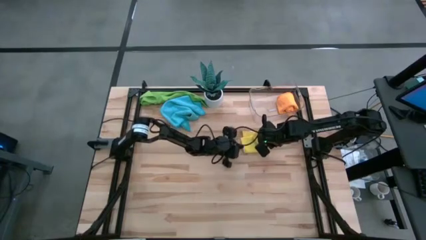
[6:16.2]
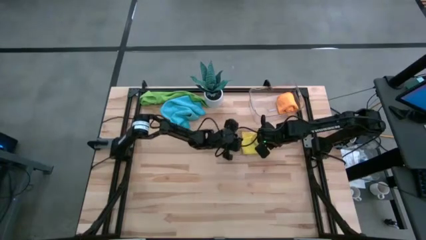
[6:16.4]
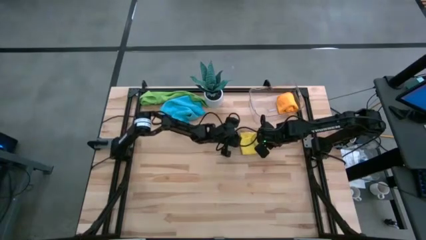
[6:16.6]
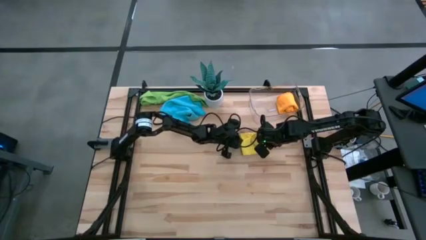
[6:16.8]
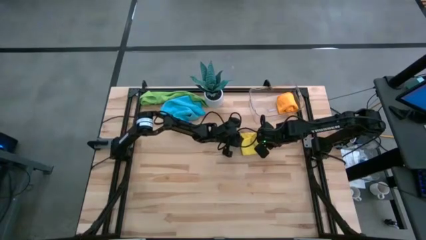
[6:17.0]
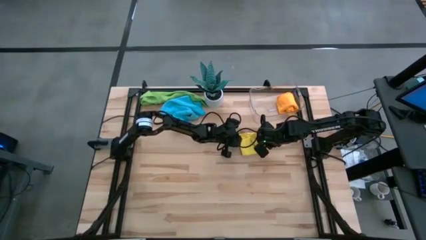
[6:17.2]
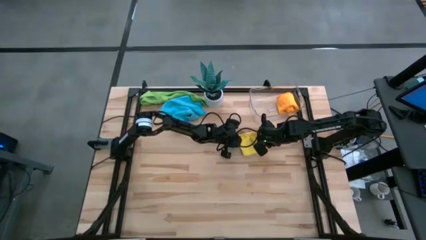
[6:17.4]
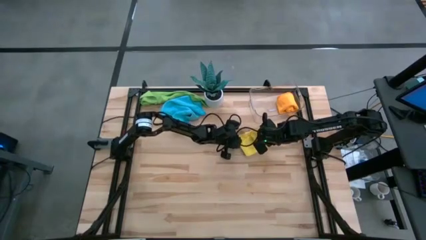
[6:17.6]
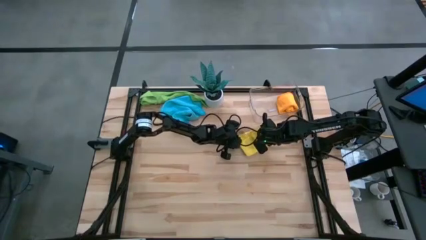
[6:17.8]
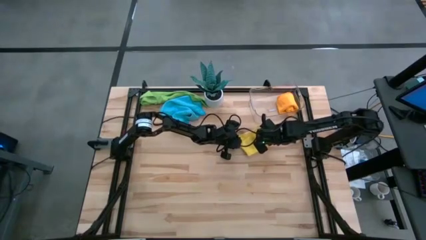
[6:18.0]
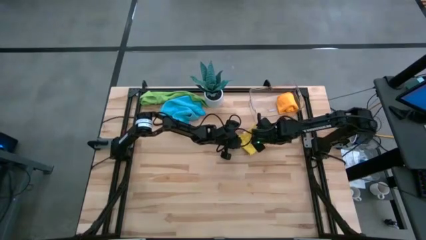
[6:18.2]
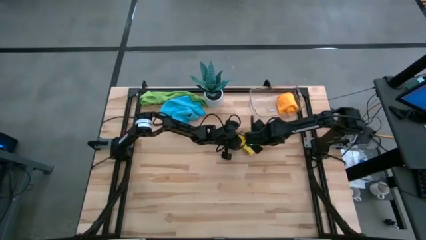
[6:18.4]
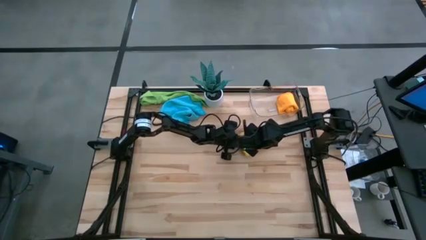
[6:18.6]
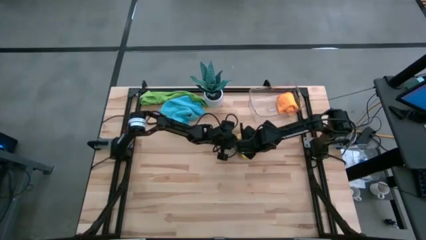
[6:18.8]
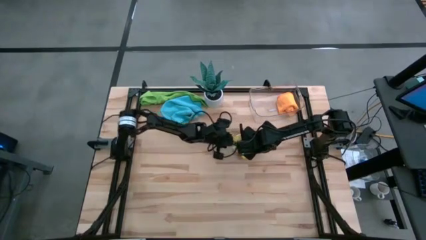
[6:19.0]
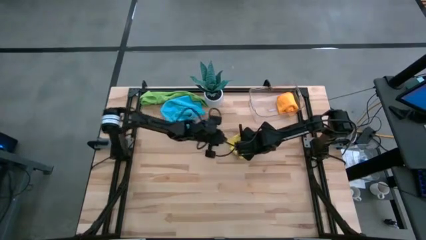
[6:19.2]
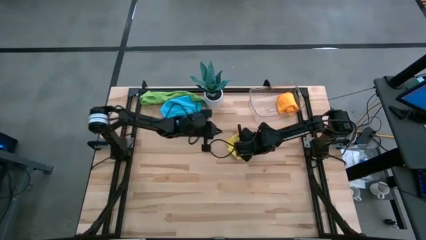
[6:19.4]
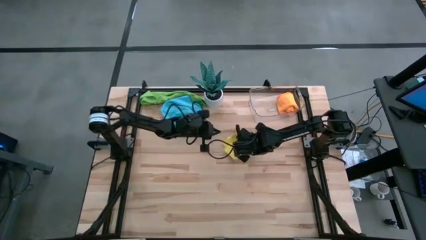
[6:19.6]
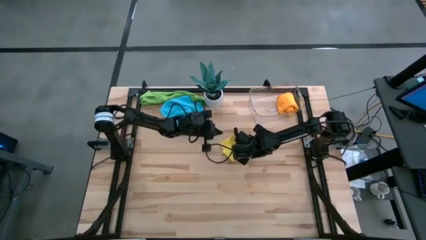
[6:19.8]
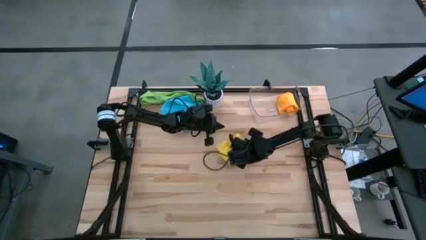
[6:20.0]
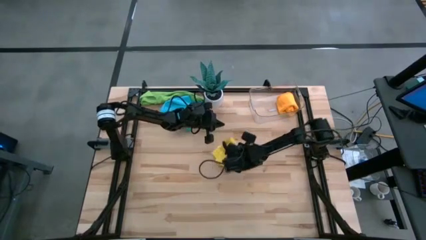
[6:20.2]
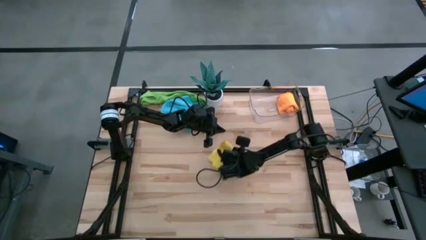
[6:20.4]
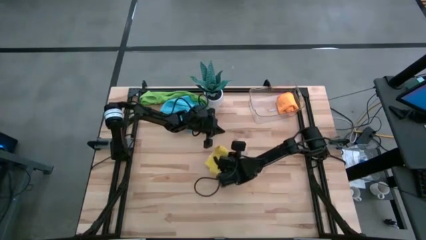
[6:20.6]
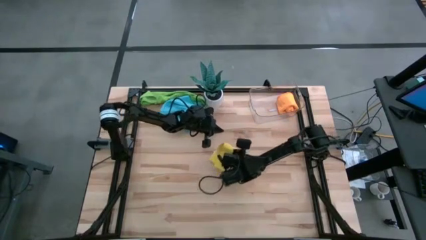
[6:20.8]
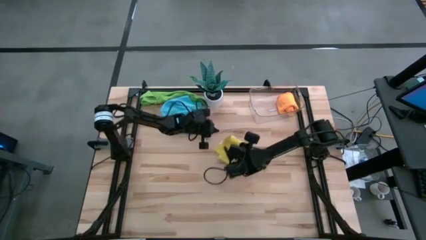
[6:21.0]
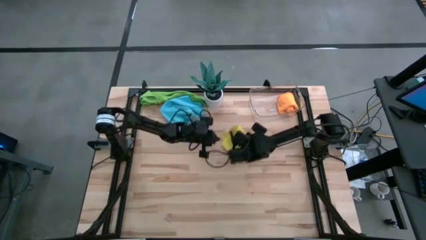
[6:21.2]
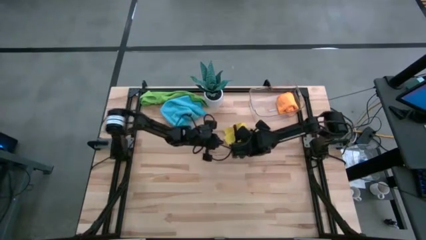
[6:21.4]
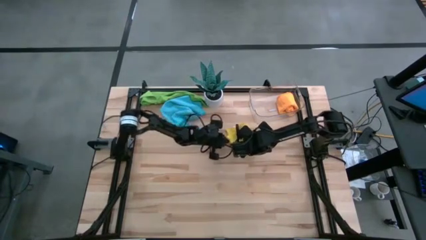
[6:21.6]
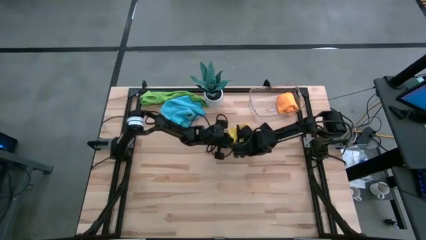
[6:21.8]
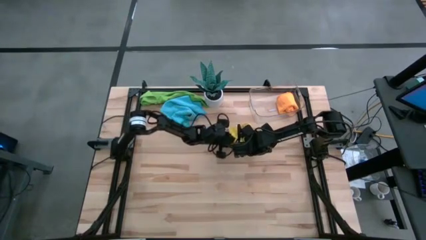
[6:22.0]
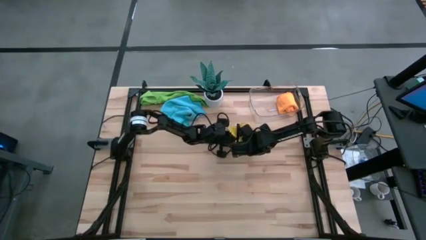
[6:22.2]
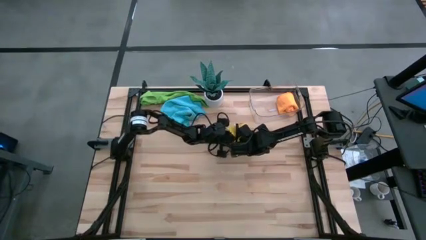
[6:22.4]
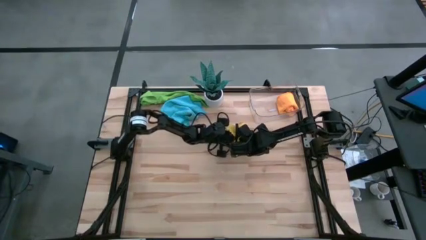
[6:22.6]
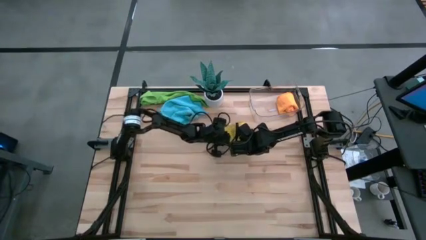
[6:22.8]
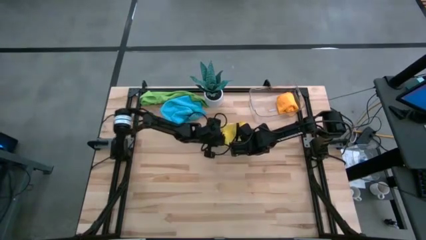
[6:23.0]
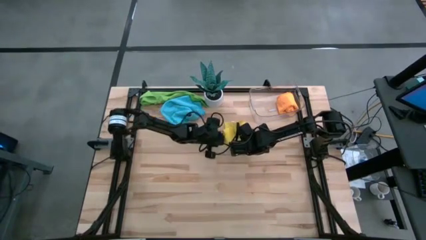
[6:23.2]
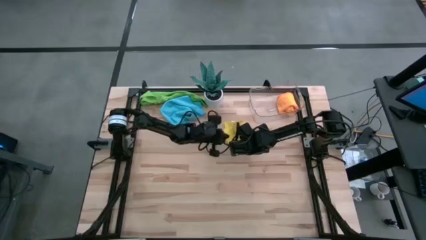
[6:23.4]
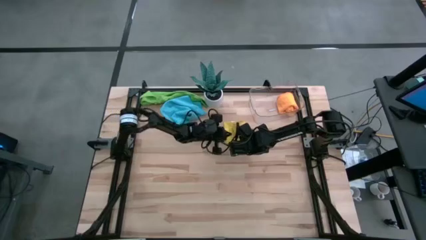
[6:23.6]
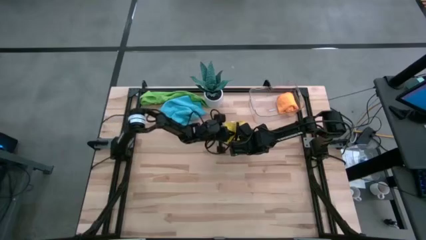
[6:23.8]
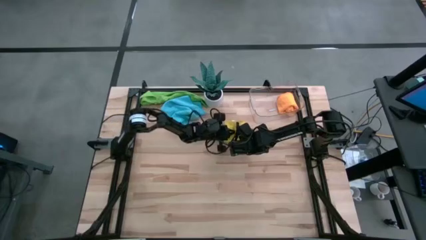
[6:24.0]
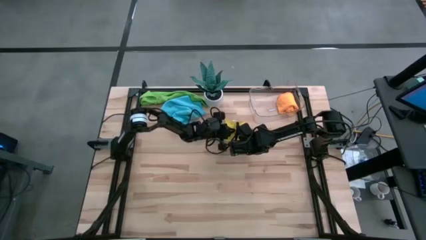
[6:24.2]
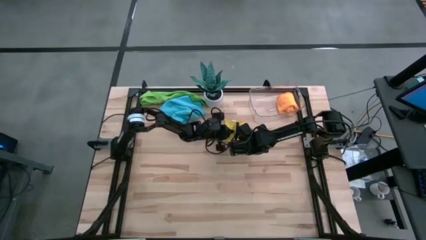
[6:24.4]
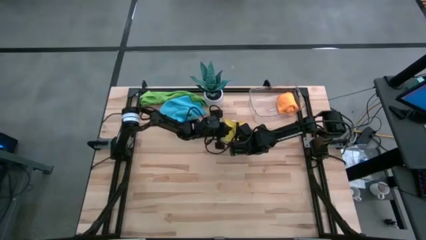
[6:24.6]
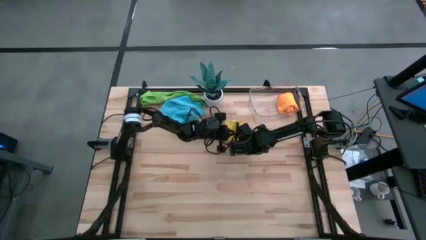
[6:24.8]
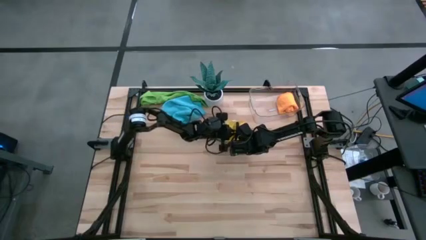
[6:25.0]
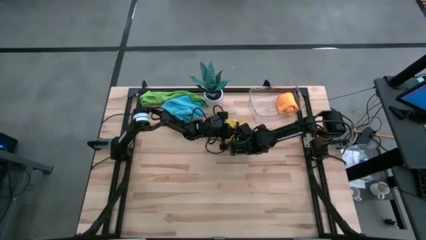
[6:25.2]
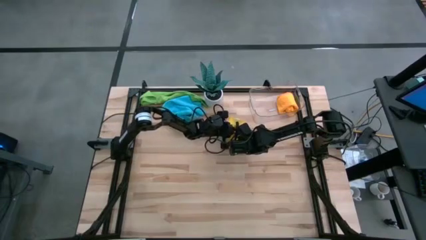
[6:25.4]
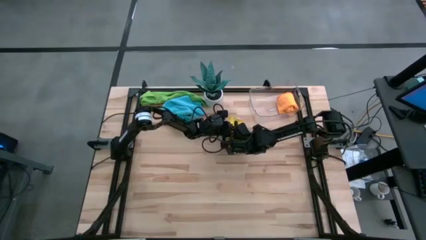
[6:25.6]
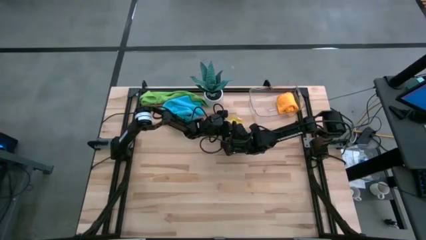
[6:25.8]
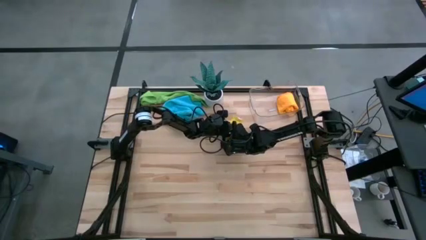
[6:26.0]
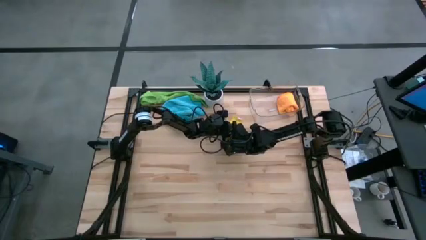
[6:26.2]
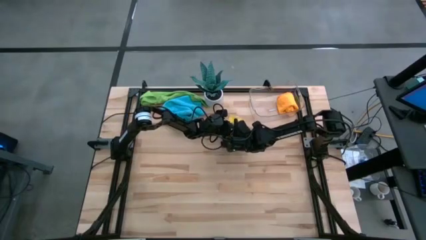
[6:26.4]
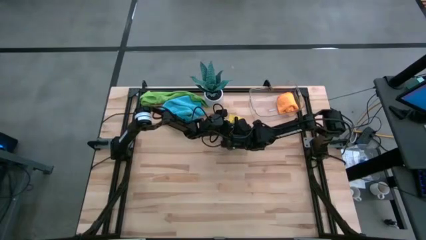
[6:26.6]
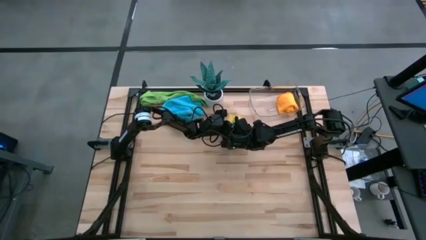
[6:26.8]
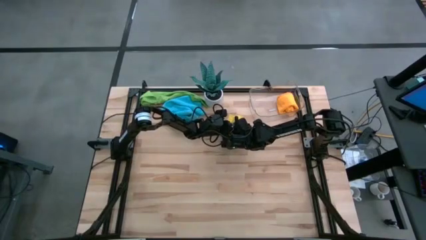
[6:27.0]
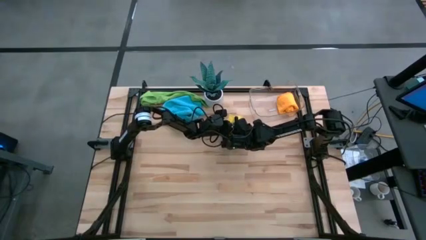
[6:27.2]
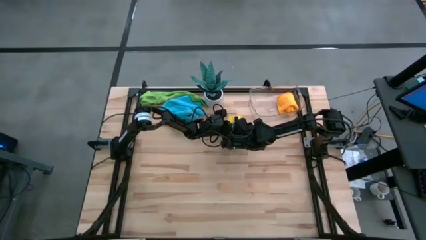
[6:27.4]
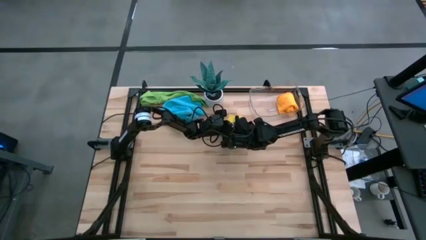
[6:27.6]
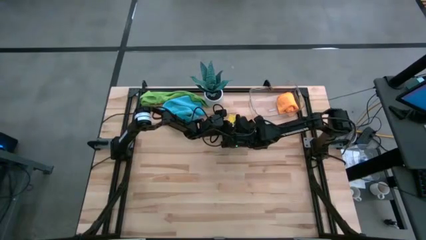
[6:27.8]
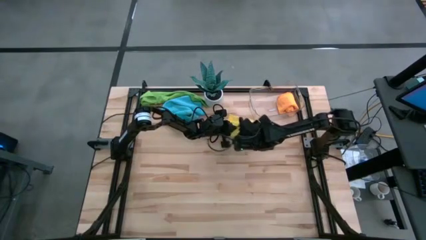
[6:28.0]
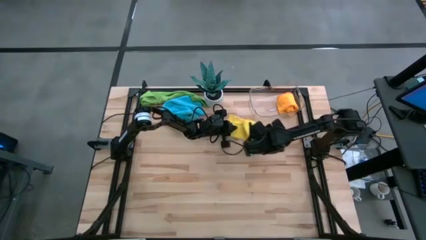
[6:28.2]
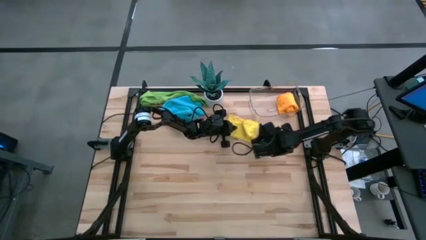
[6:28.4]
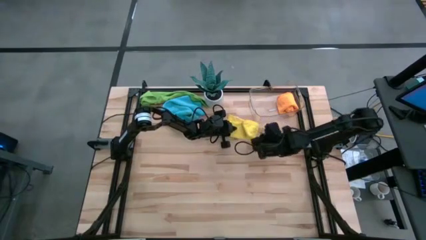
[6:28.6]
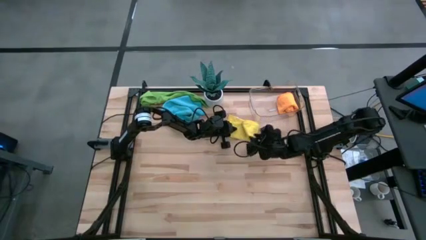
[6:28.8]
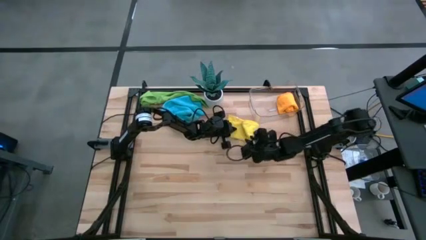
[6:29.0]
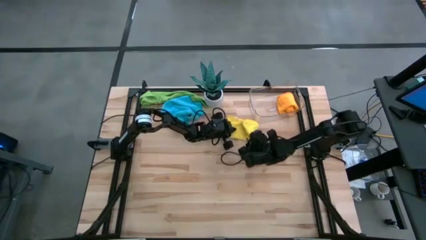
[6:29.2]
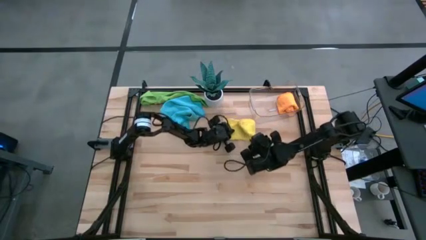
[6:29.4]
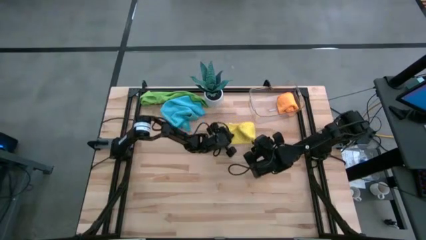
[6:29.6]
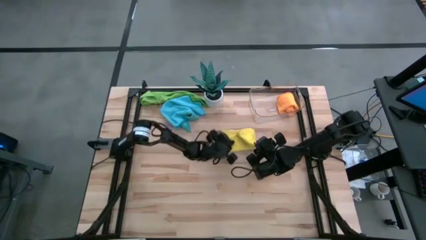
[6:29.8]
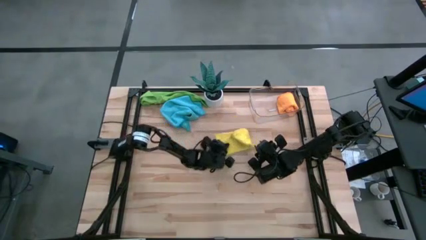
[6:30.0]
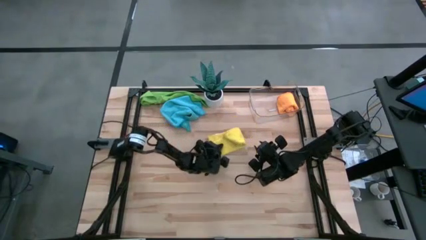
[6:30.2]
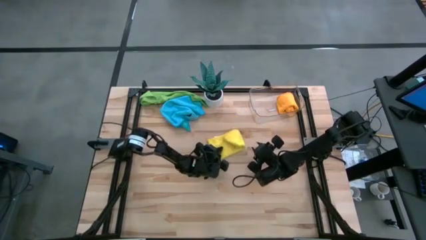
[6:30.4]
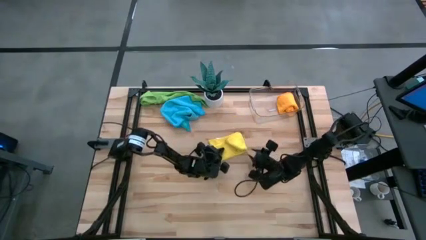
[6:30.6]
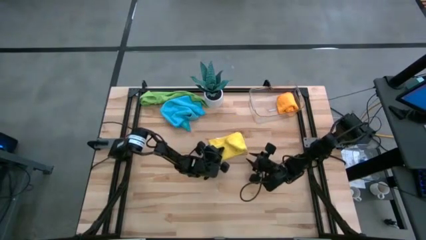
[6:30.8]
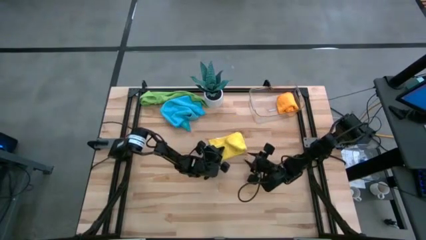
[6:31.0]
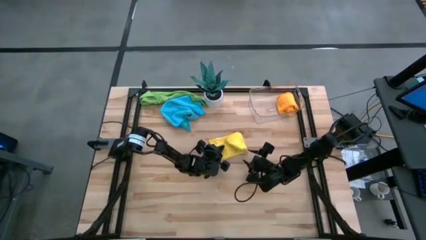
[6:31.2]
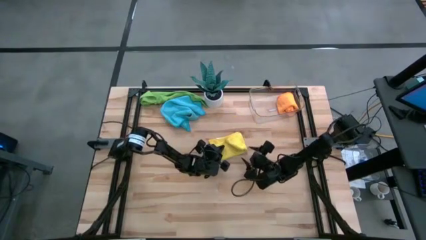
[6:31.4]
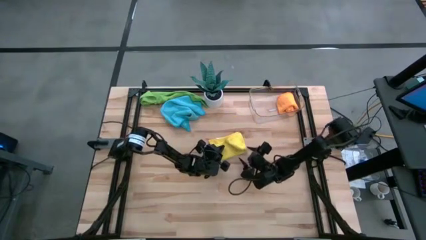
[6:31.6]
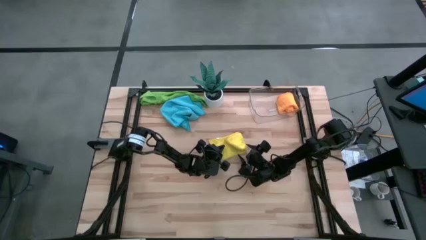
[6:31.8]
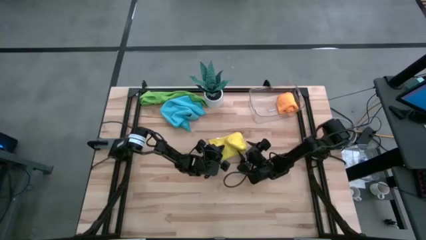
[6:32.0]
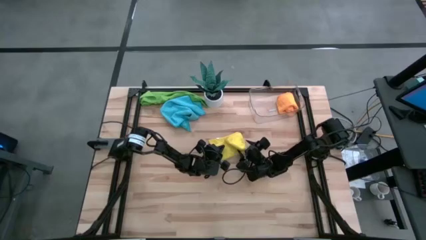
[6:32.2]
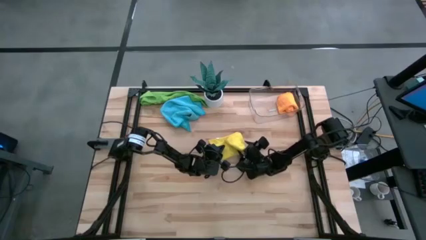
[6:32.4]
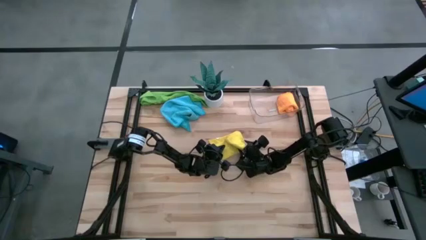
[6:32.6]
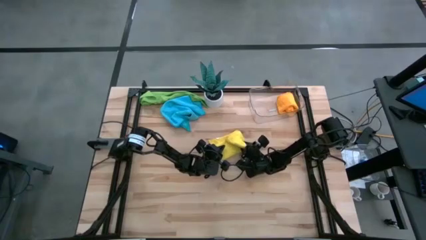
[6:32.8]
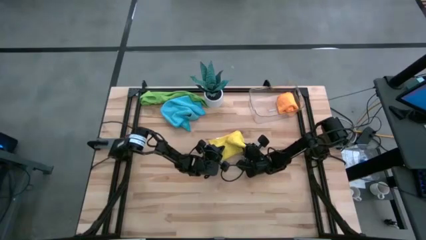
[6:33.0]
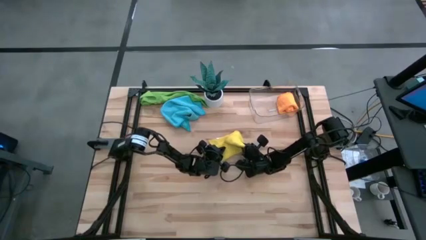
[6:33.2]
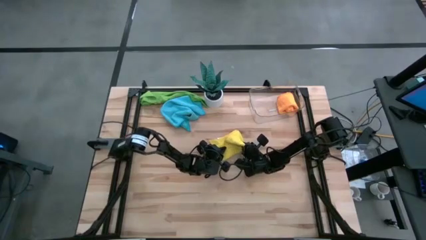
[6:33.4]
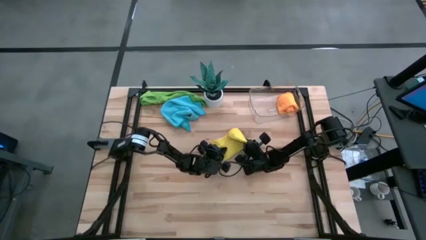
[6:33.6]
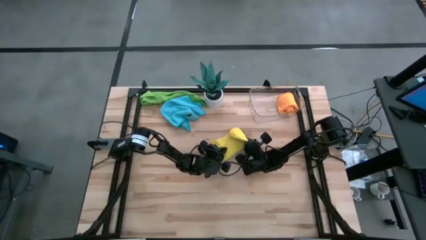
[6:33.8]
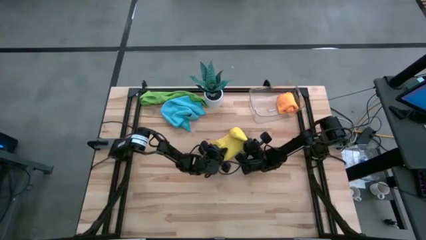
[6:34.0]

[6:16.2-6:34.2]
Task: Roll microfiber towels into tight, uniform cylinder then place into a basket
Roll the yellow microfiber cloth
